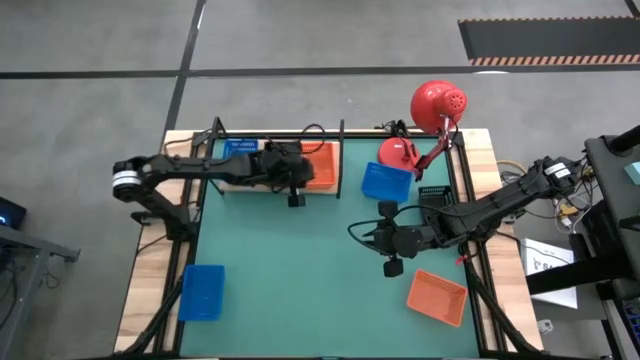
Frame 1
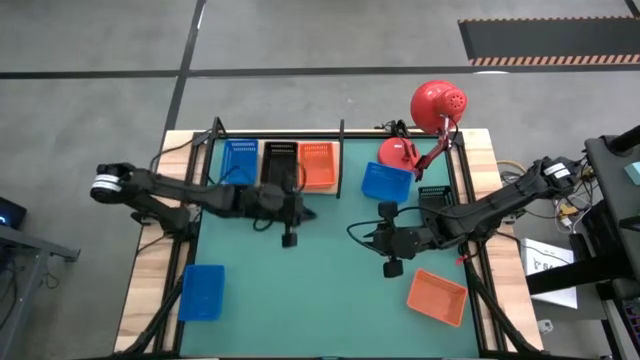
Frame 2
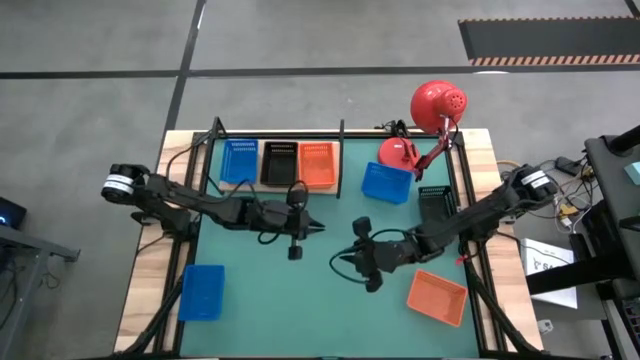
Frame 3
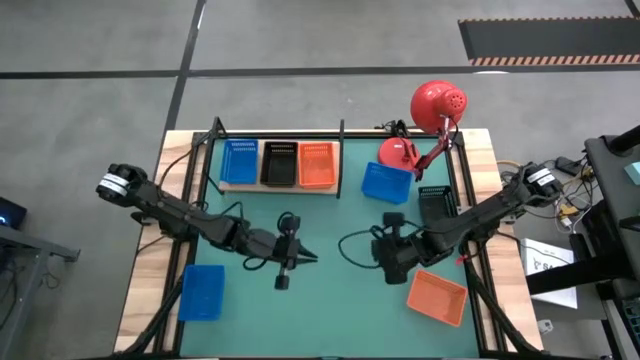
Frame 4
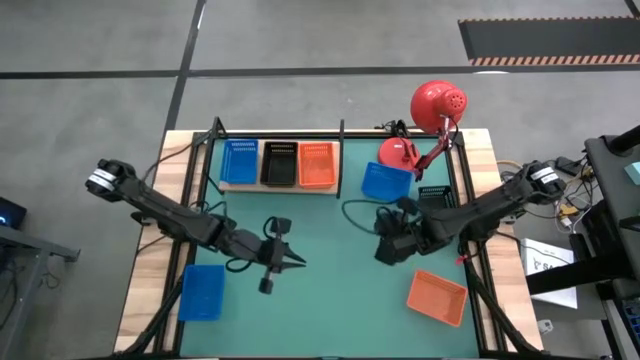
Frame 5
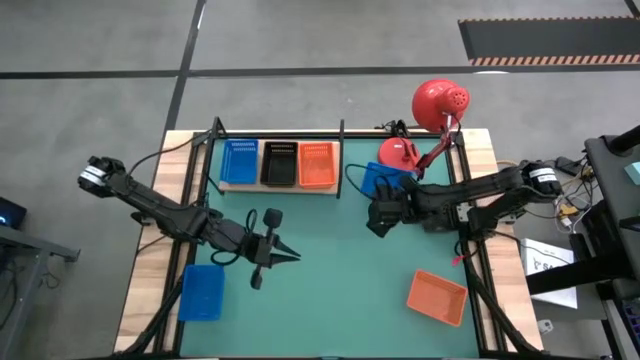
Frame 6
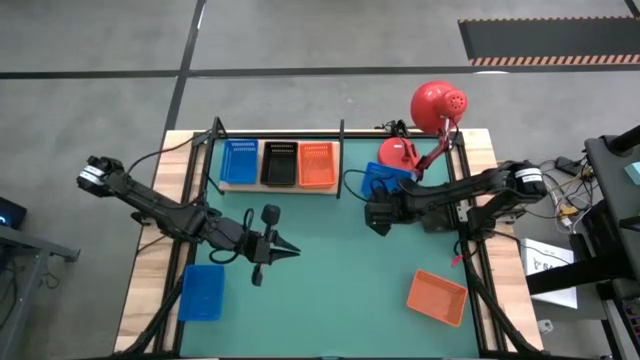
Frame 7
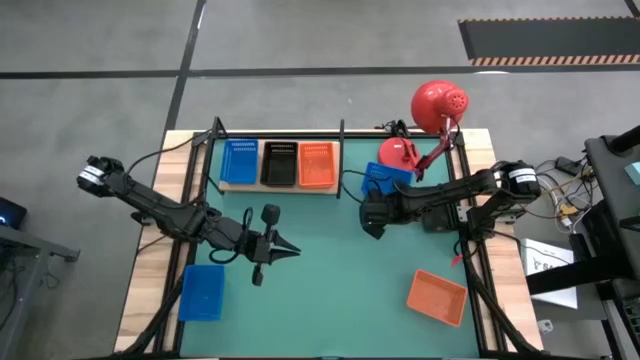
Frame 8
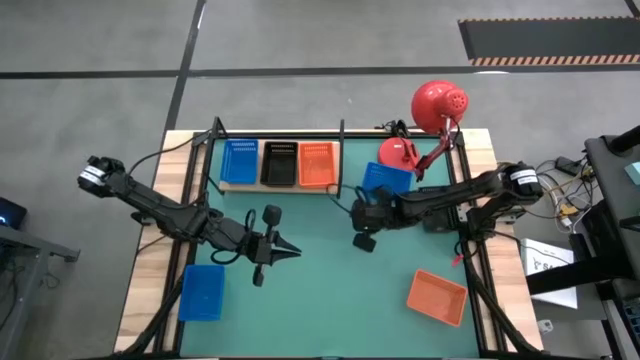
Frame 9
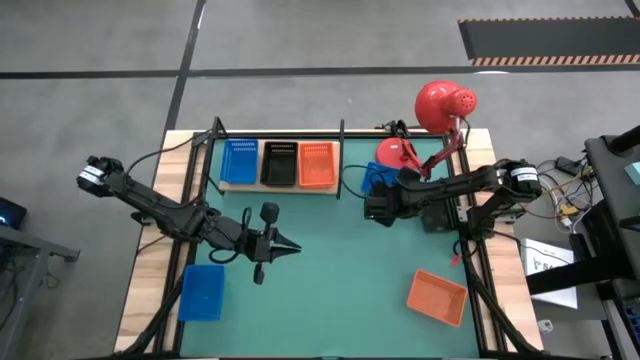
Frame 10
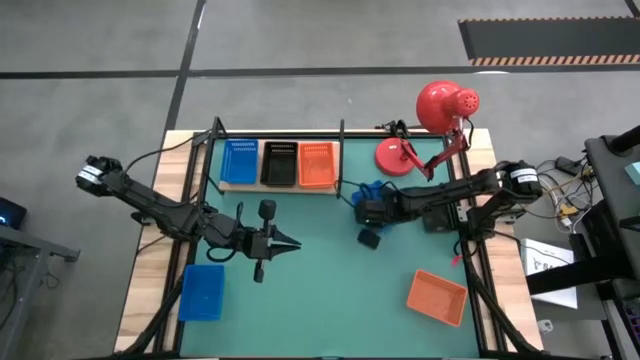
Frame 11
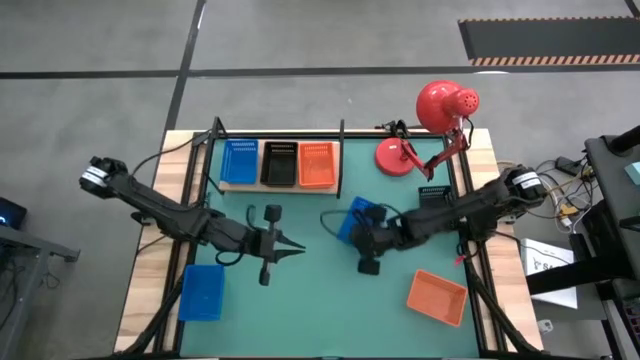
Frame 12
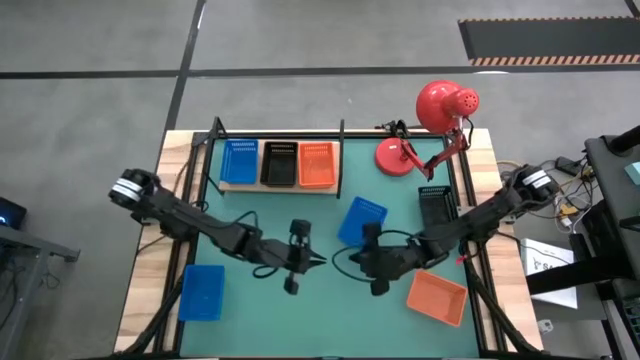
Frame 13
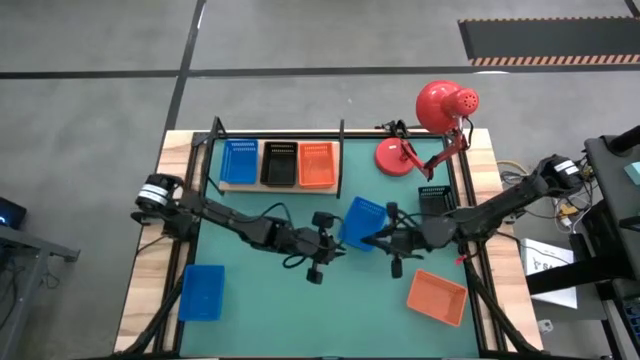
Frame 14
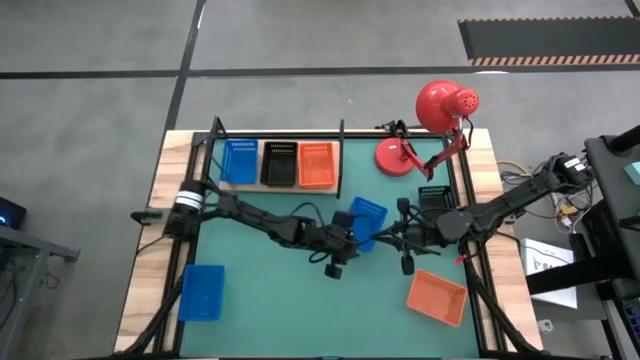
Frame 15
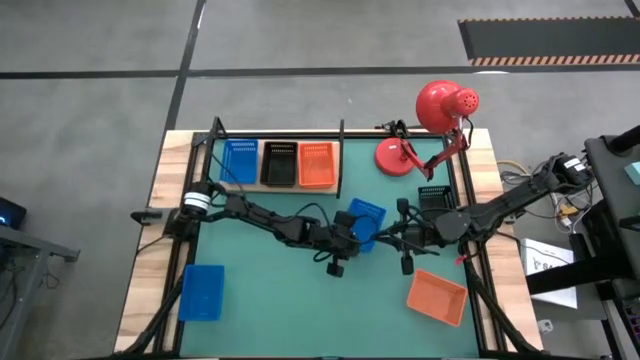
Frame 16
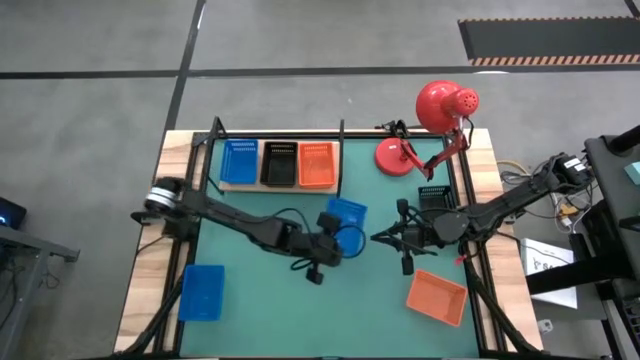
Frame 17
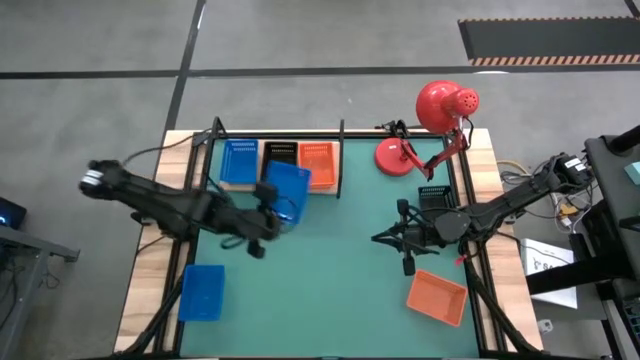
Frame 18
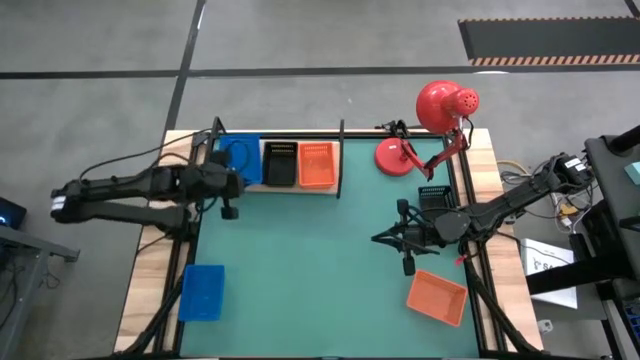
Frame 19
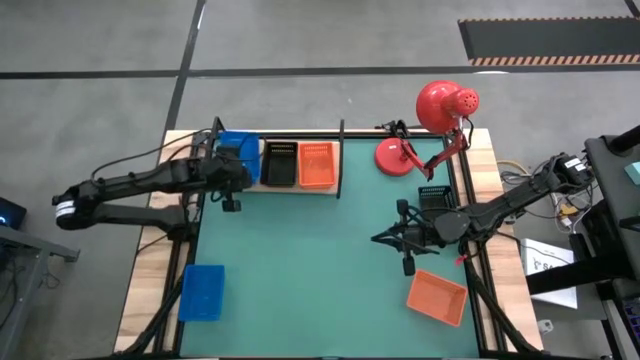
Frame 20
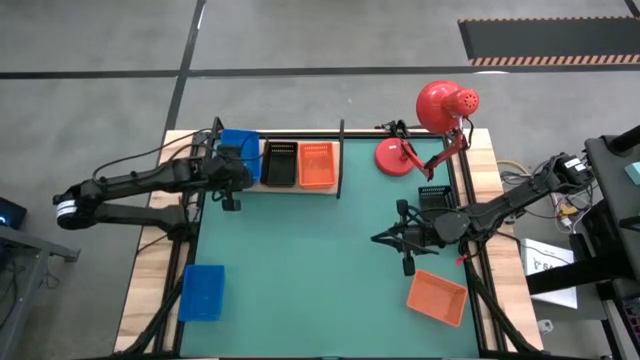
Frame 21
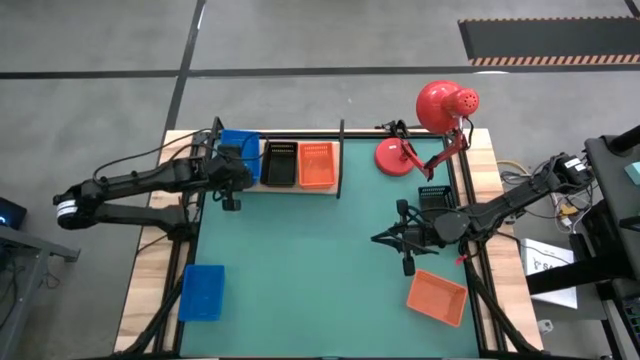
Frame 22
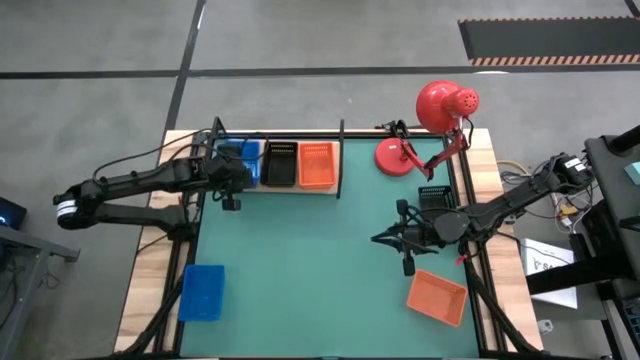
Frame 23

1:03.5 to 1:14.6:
Task: Stack baskets on shelf by color
Stack the top blue bin on top of the blue bin on the shelf

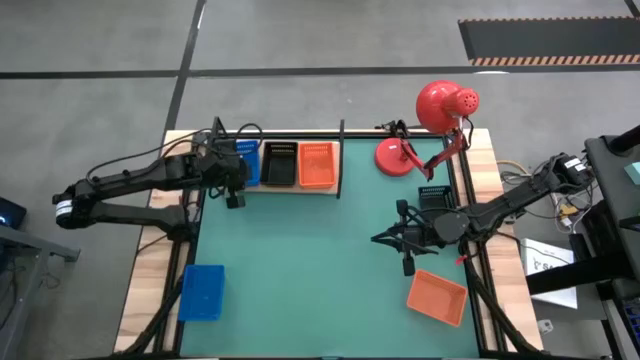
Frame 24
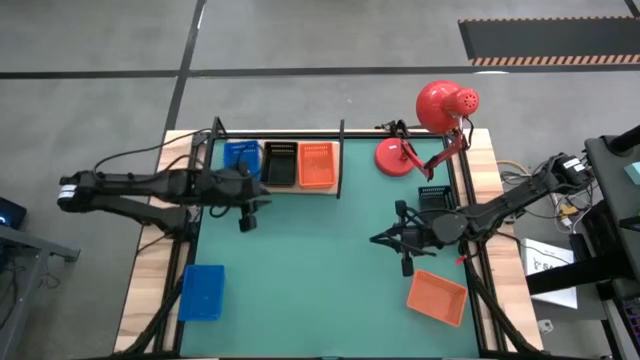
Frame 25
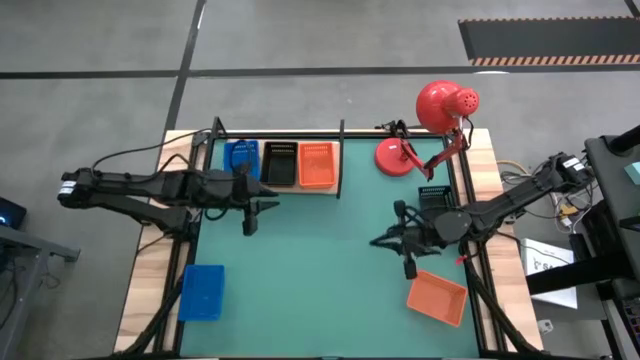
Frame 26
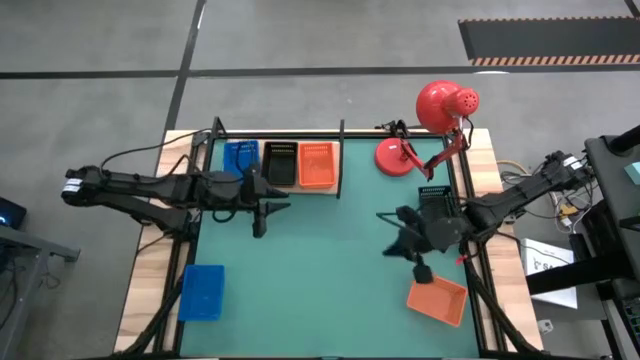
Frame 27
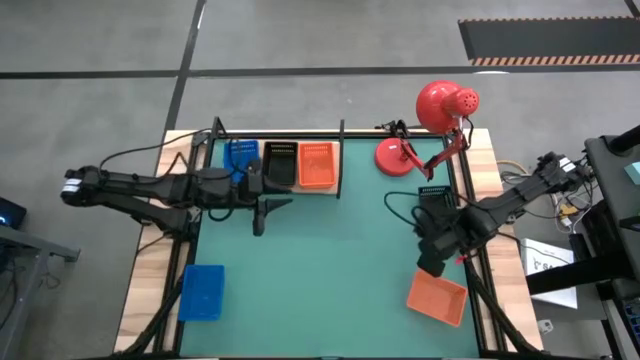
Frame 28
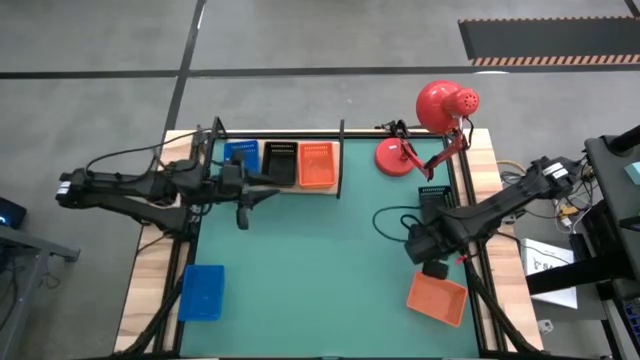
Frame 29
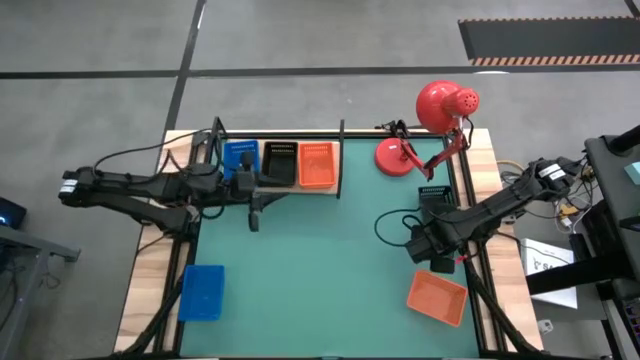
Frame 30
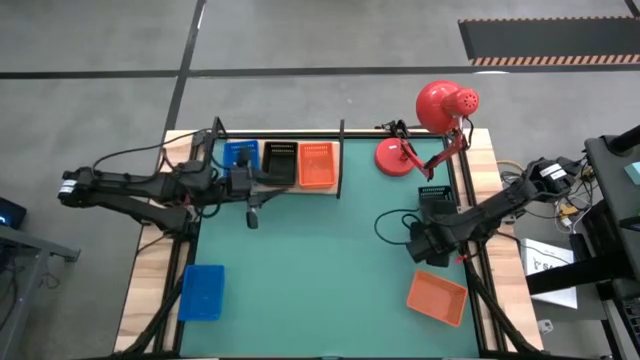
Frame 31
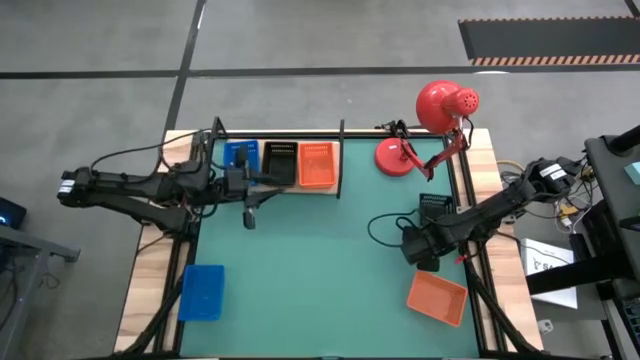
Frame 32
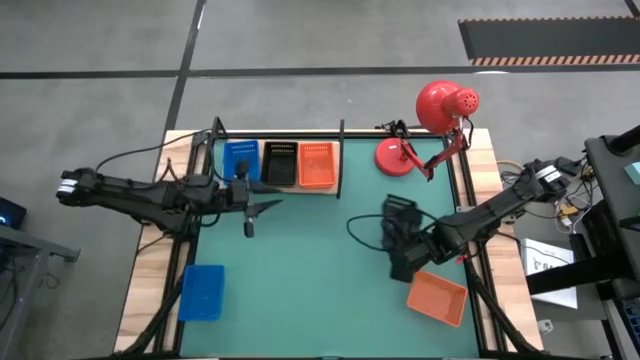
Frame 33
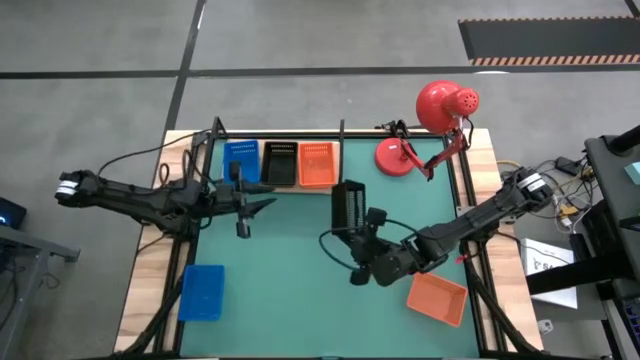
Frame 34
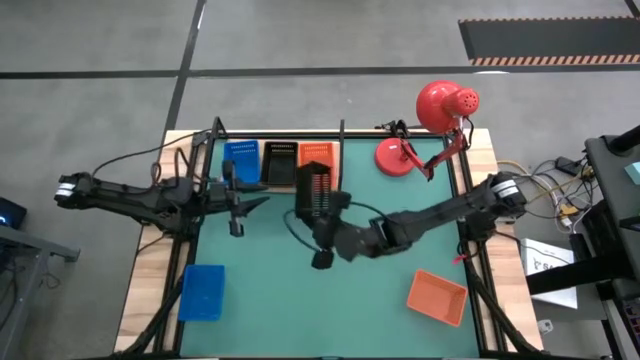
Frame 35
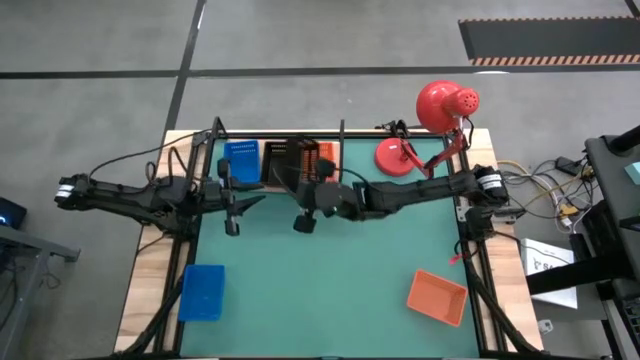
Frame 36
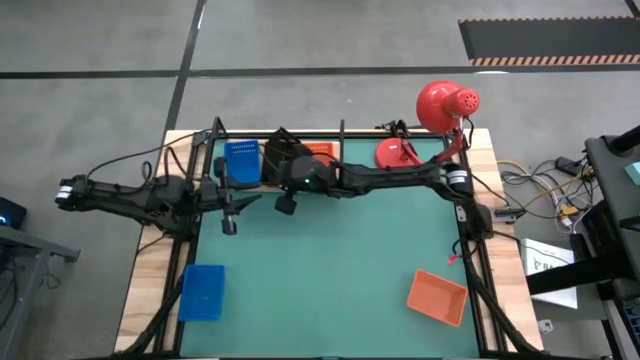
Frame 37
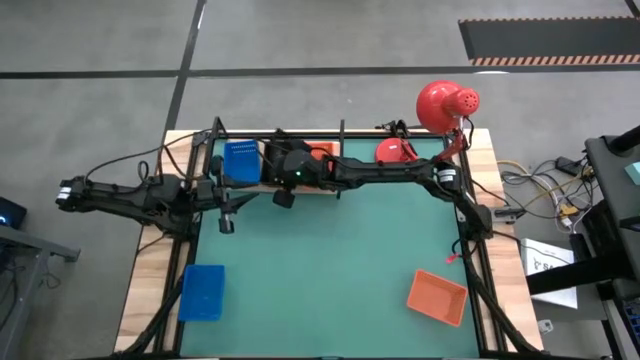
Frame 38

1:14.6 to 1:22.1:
Stack the black bin on top of the black bins on the shelf

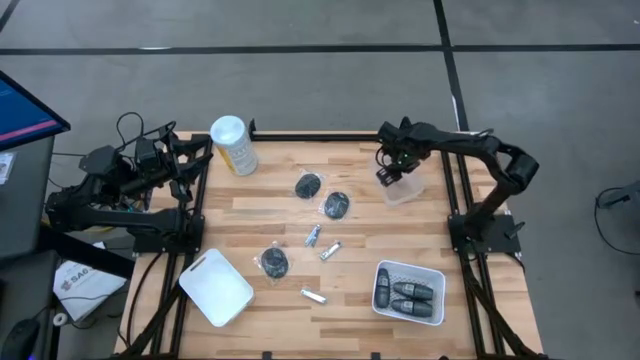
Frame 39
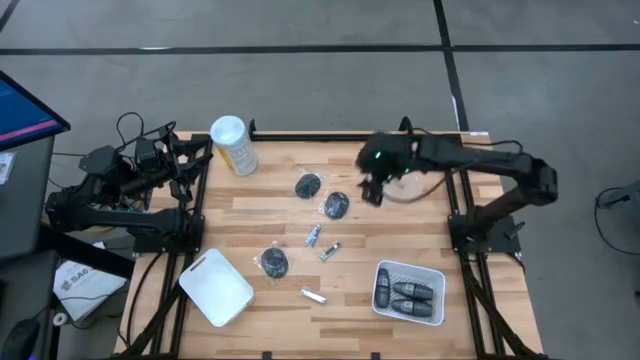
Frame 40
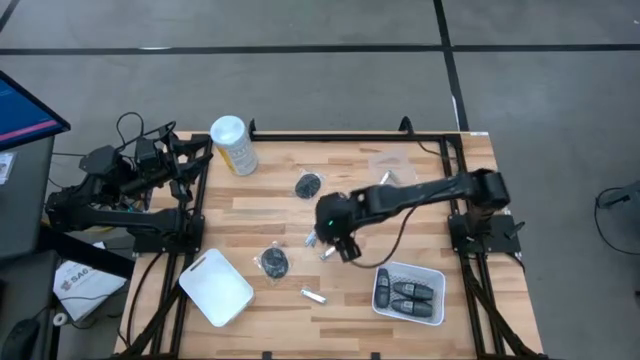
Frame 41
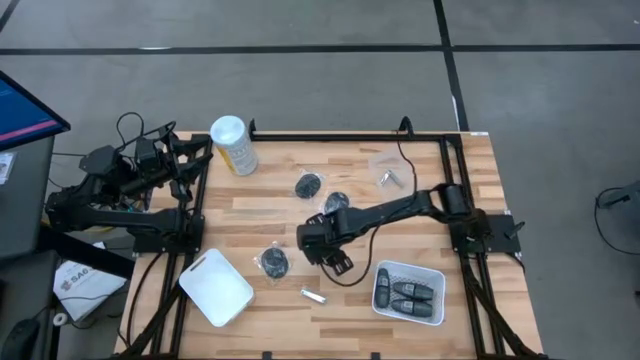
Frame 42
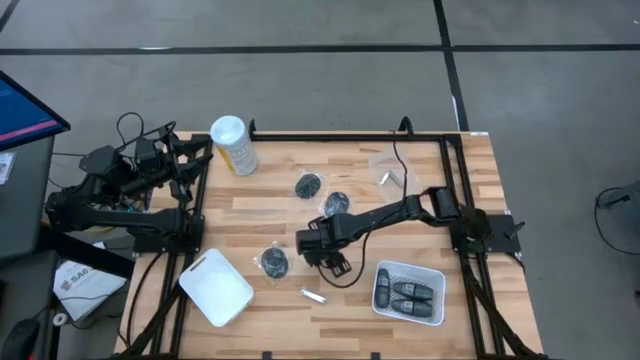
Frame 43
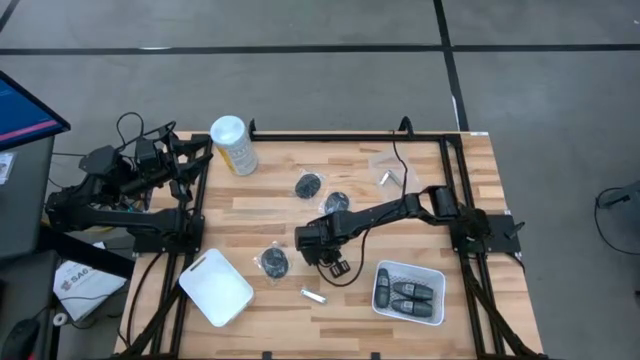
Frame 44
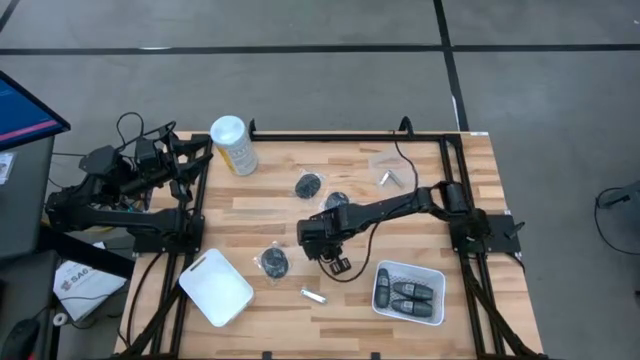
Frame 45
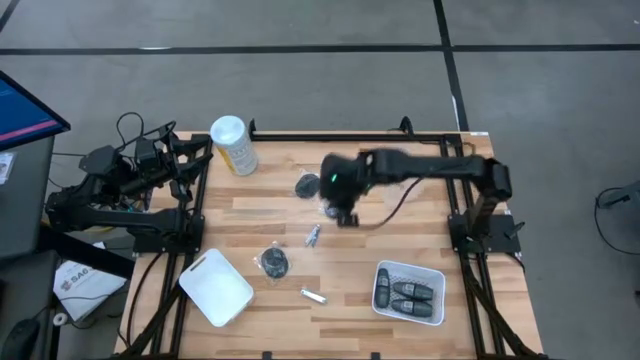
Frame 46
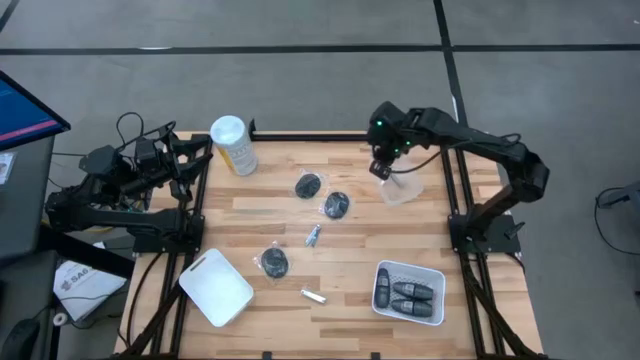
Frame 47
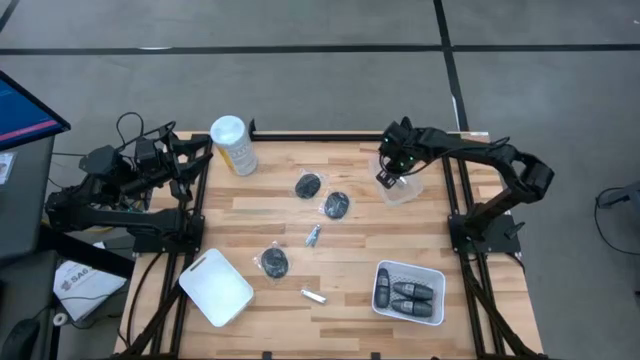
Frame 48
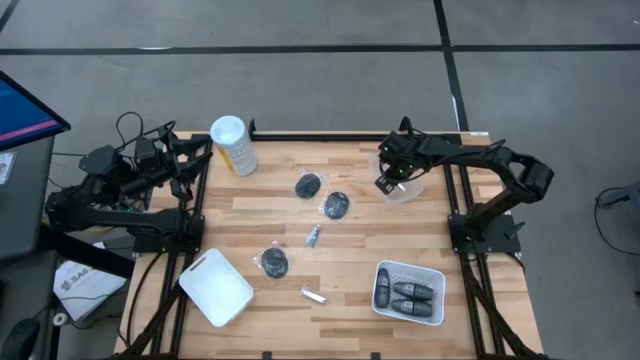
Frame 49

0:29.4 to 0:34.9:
Task: Pick & Place Travel size toiletries
Put the silver nail cutter into the transparent bin
